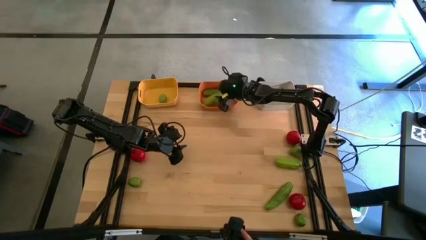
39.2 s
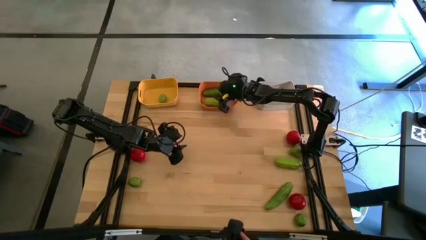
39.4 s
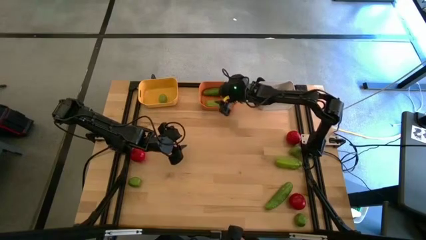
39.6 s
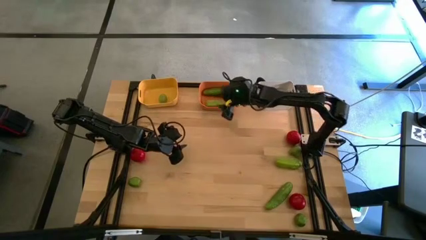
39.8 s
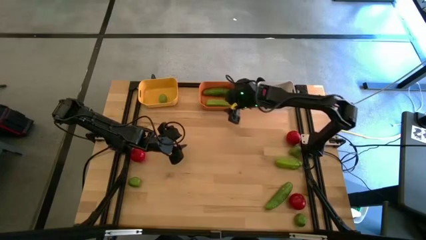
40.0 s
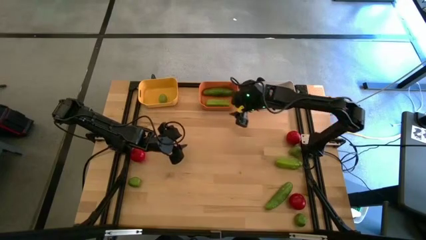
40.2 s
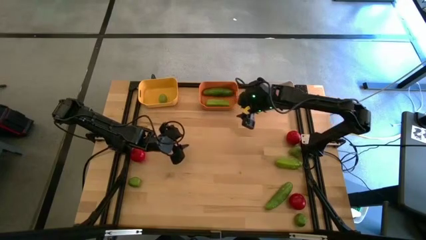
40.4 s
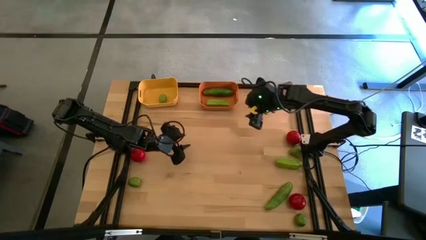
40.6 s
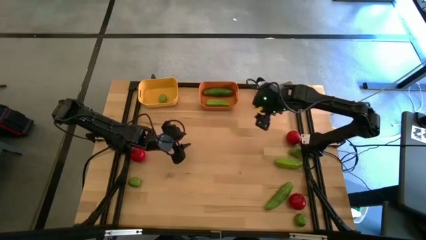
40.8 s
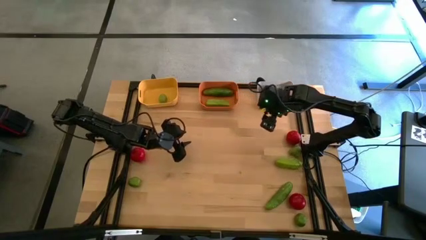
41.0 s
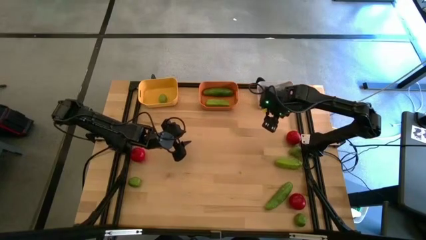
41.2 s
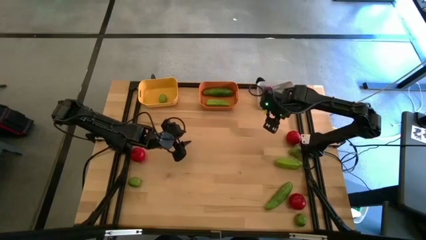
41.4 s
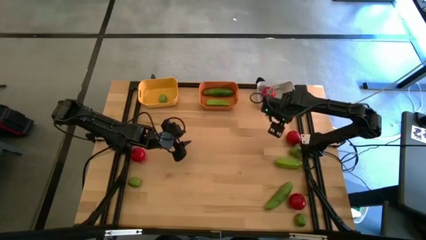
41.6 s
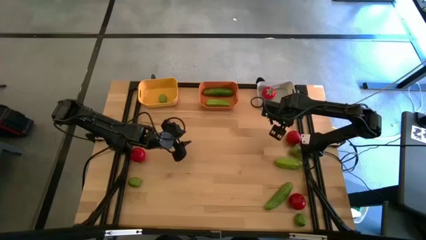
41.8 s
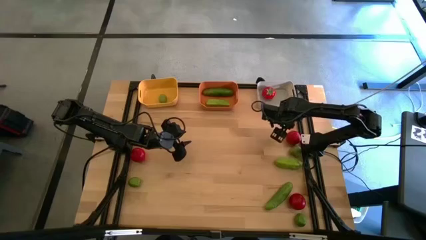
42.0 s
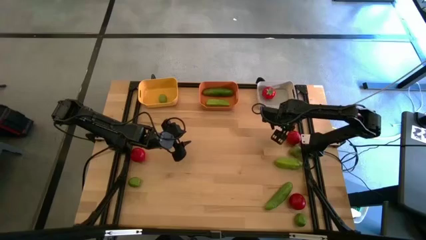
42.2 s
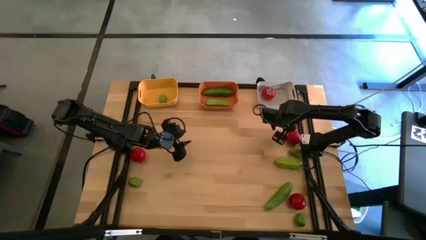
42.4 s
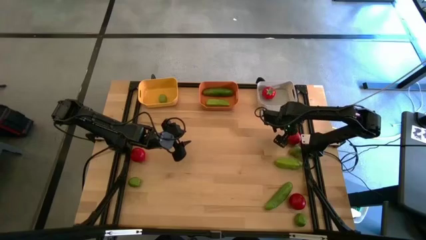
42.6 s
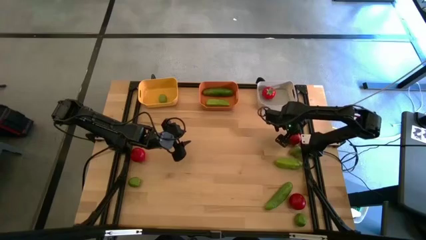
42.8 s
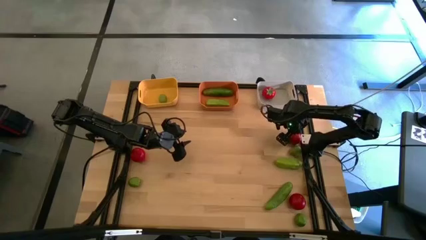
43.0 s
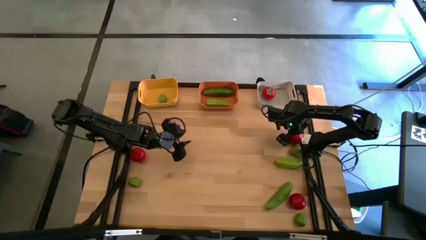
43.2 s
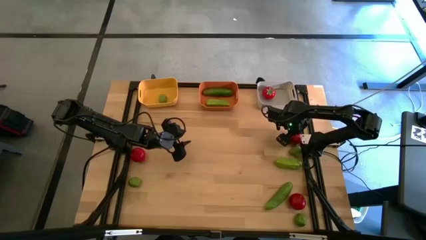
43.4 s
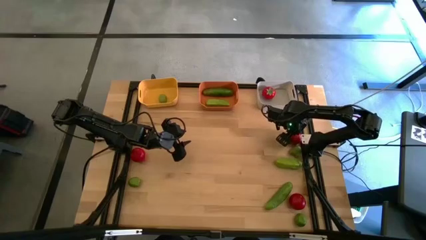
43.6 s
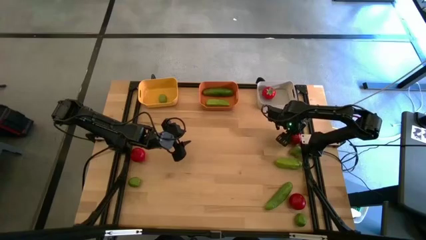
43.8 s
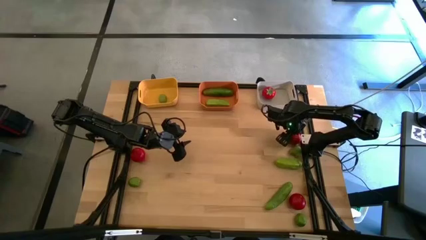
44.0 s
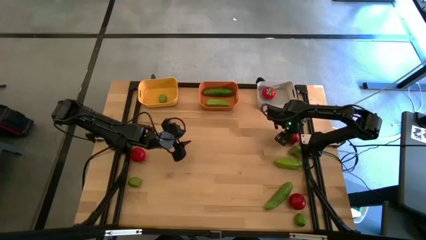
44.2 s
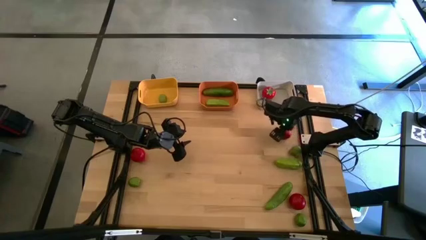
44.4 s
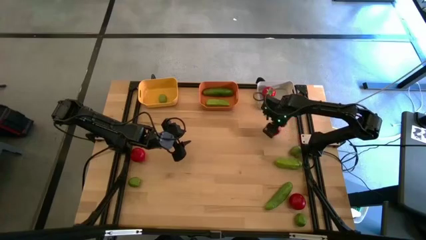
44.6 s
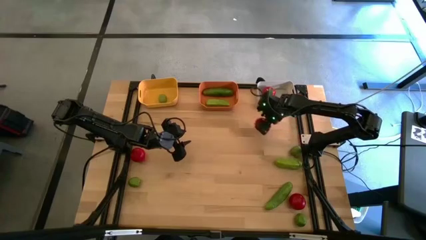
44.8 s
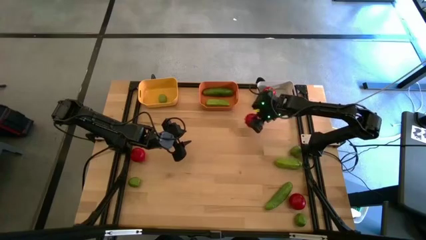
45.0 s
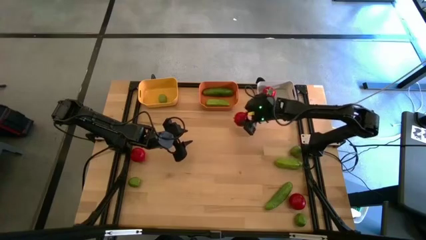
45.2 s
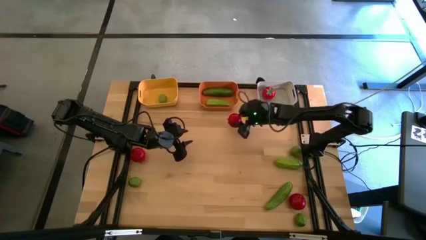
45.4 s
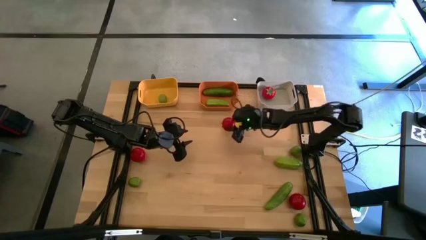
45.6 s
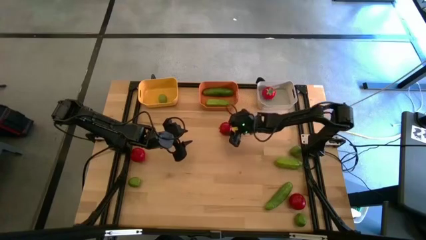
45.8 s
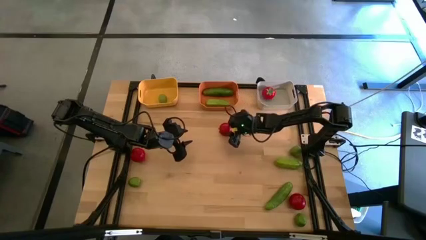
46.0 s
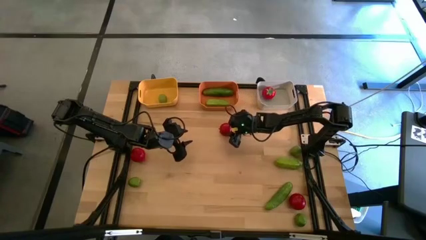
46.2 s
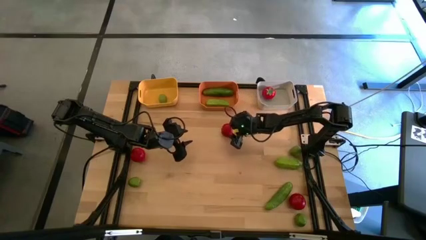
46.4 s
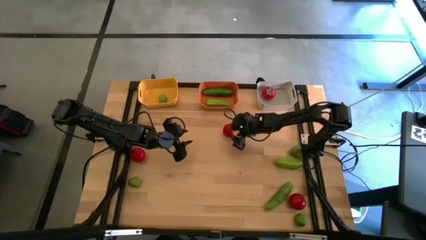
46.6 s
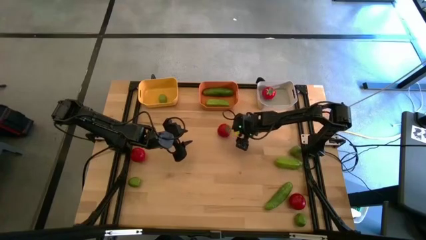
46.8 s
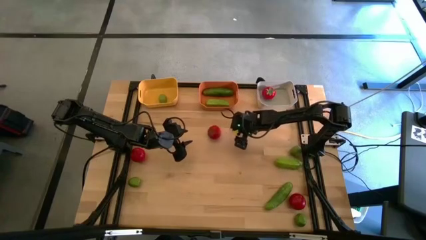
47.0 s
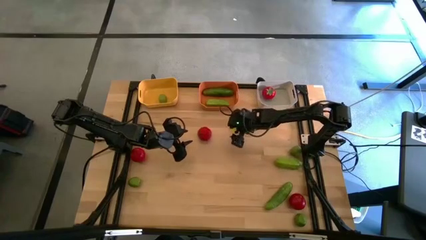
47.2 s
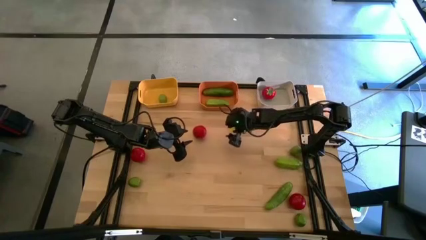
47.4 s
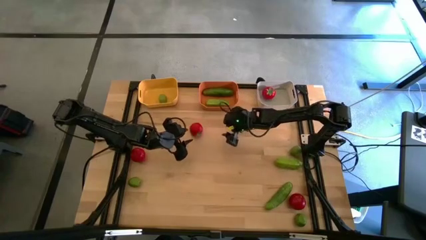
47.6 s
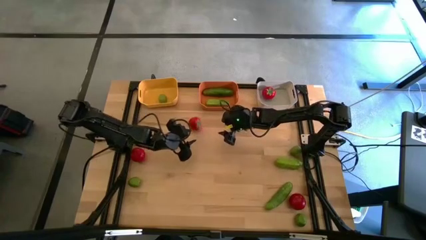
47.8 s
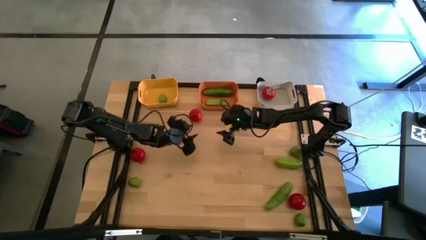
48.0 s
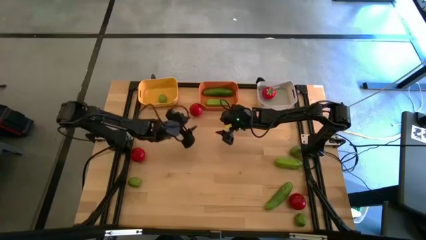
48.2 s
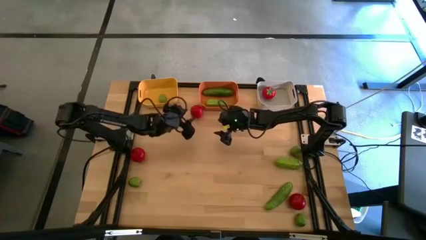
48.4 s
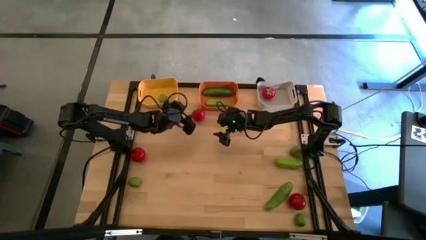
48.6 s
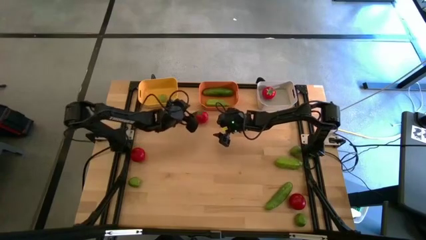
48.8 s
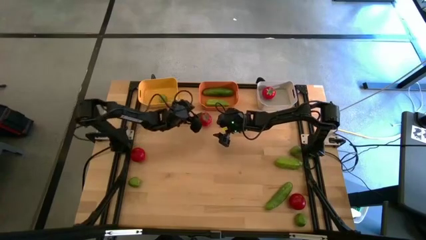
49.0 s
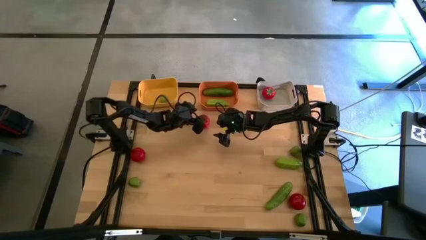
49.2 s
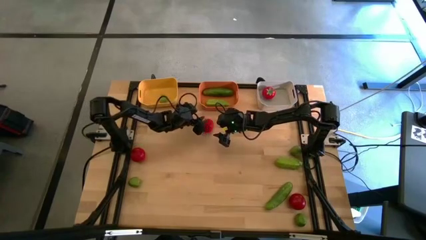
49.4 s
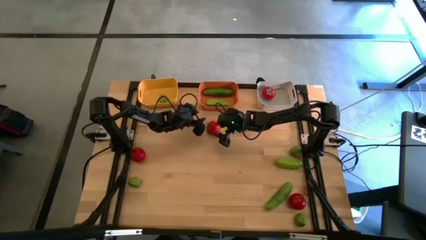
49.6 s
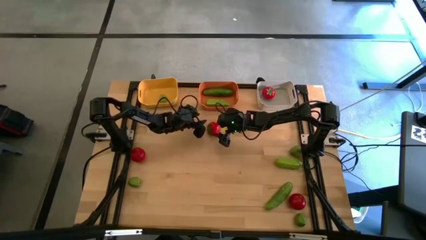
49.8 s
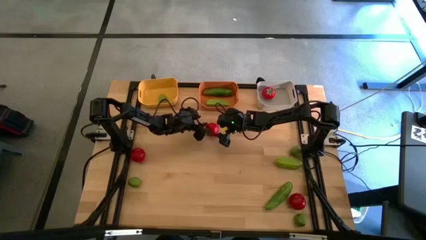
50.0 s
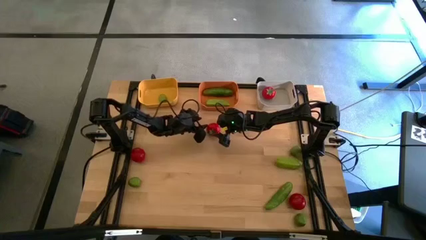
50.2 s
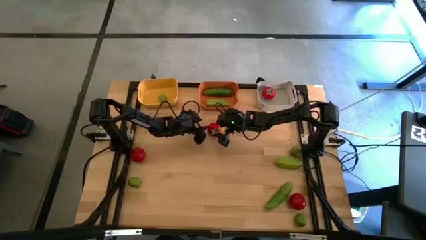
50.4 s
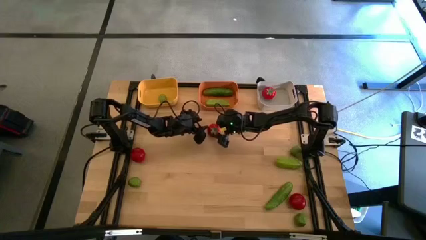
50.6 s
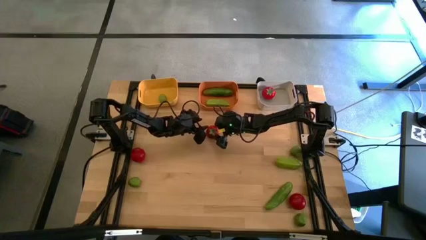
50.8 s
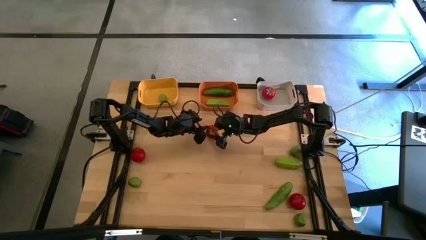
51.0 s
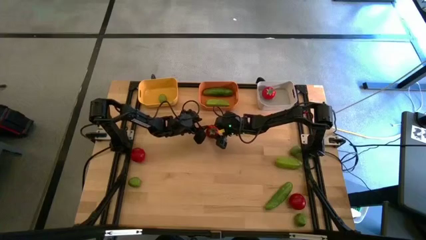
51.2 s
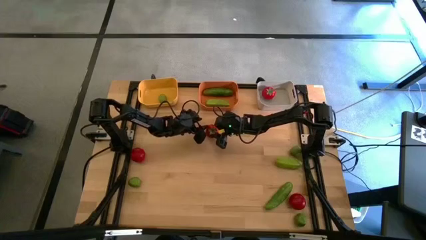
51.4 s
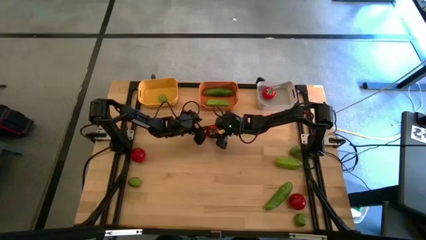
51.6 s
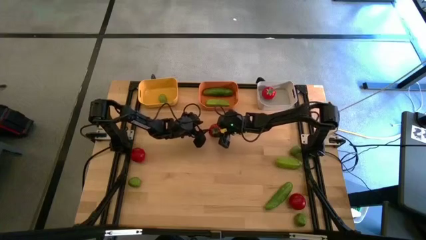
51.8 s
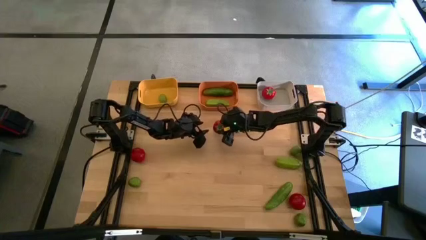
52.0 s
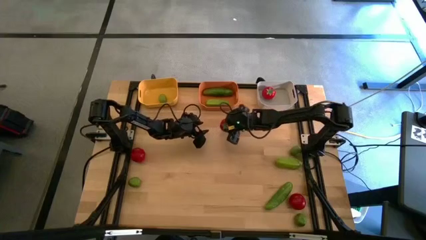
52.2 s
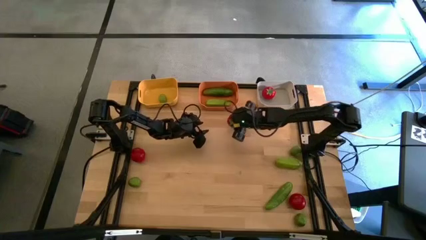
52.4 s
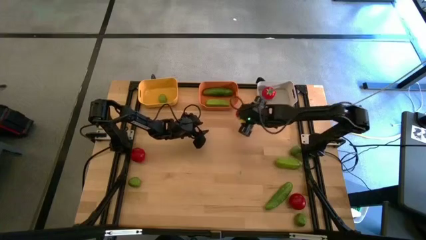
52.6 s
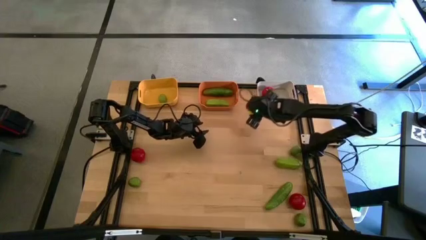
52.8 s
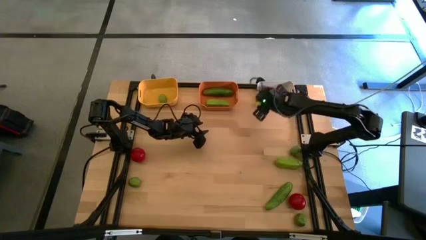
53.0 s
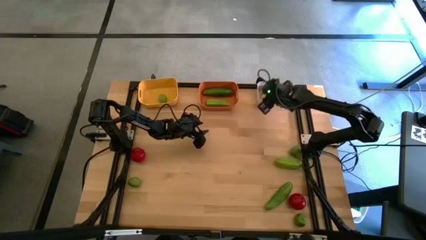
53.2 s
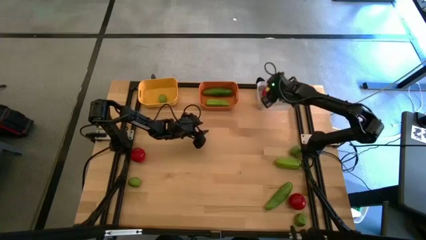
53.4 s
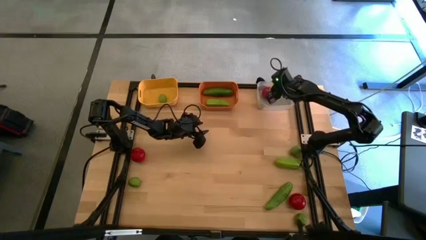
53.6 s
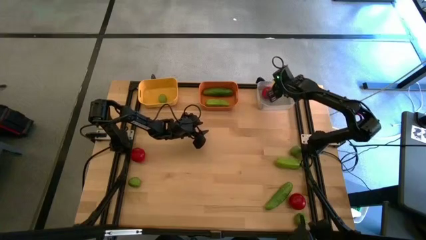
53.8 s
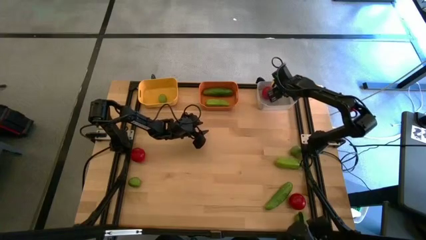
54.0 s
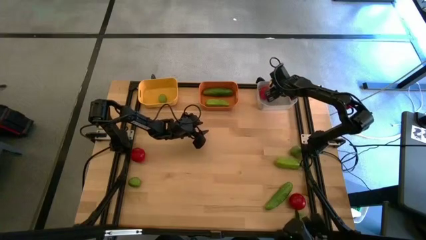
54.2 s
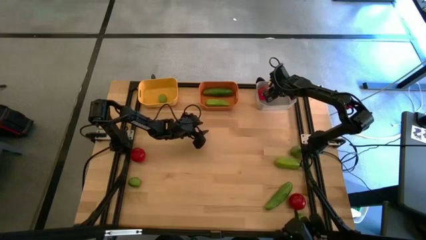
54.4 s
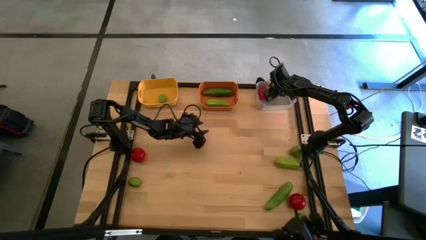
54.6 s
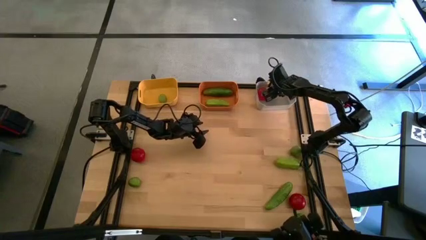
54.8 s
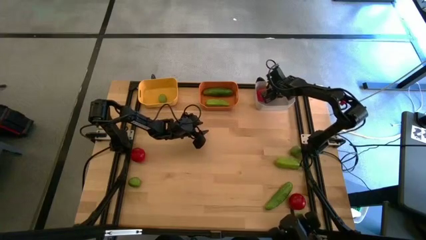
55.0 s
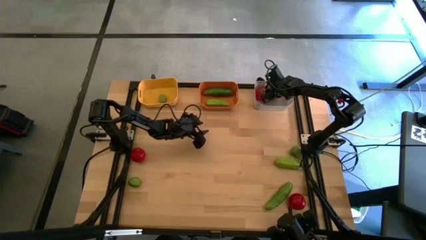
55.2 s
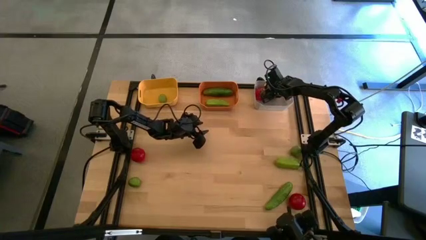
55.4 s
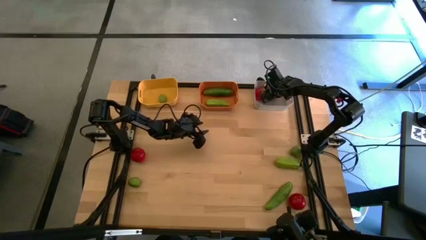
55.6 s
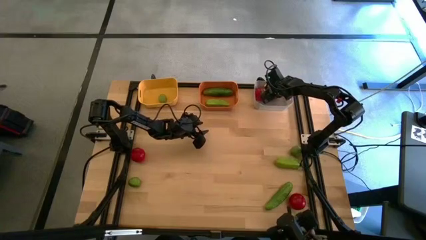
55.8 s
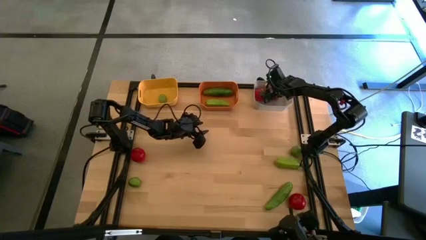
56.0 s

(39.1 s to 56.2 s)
Task: Sort produce into baskets
Put the tomato into the white bin
